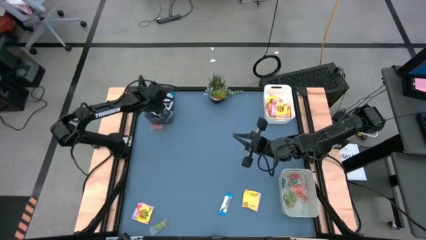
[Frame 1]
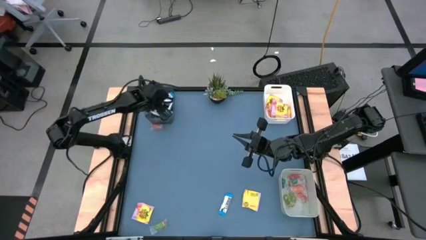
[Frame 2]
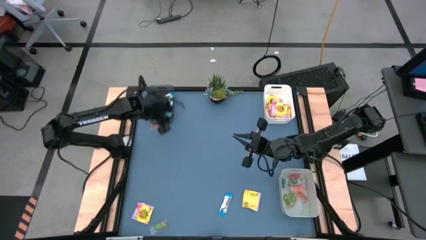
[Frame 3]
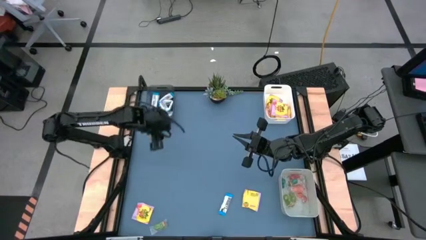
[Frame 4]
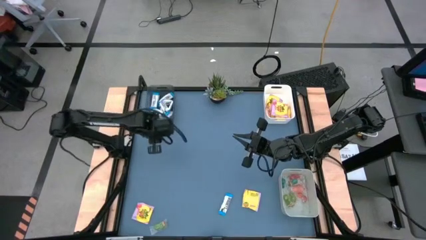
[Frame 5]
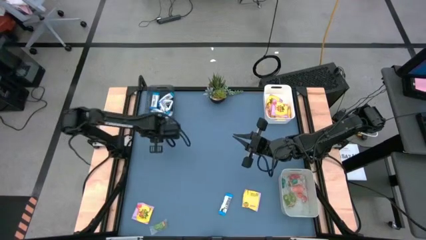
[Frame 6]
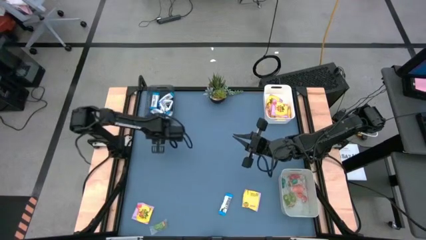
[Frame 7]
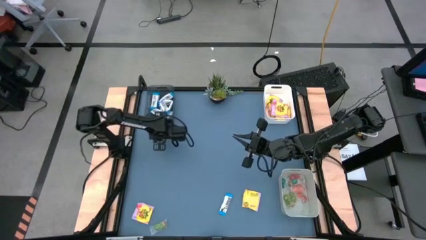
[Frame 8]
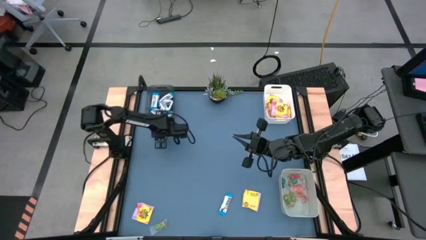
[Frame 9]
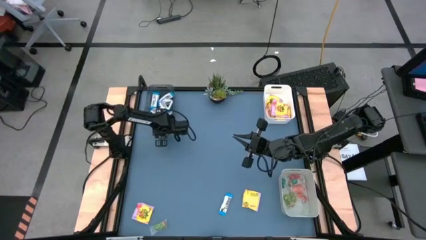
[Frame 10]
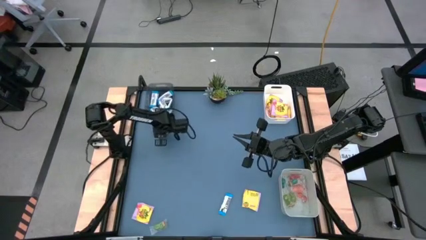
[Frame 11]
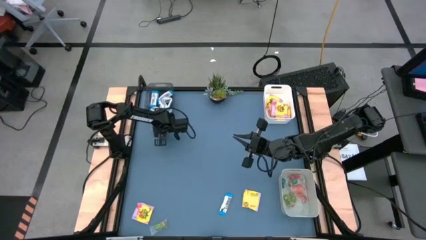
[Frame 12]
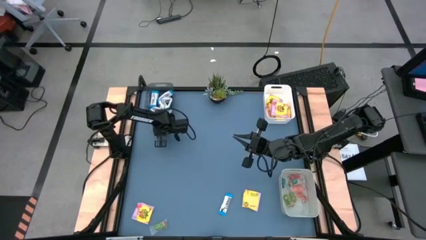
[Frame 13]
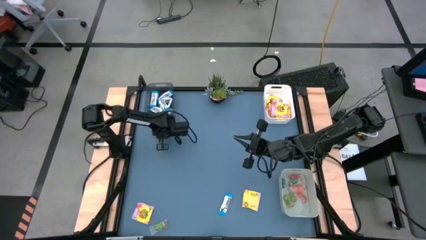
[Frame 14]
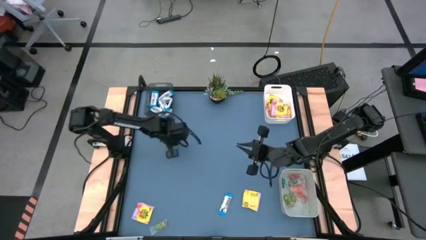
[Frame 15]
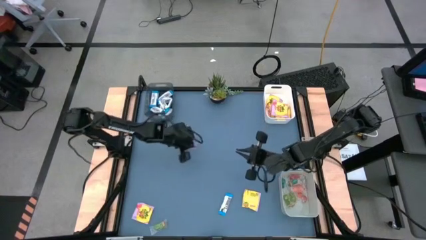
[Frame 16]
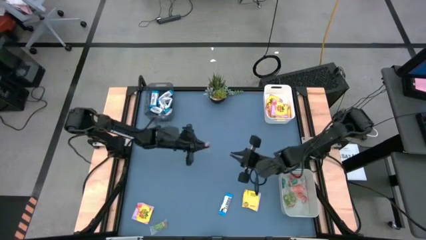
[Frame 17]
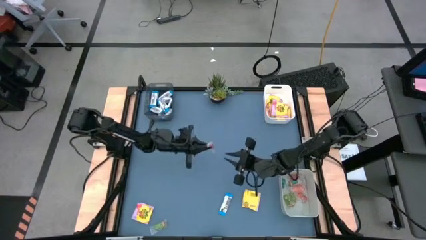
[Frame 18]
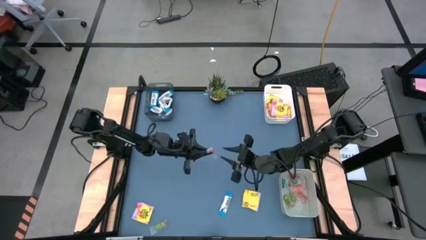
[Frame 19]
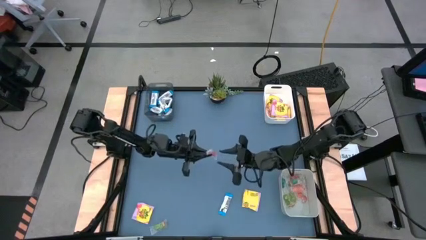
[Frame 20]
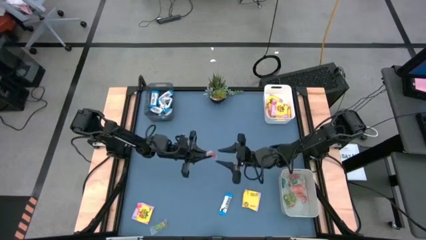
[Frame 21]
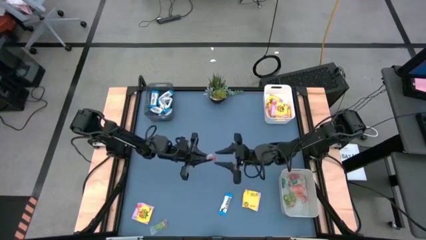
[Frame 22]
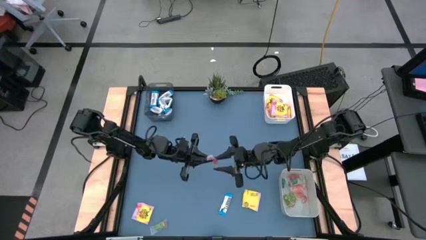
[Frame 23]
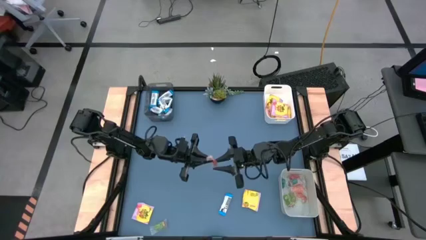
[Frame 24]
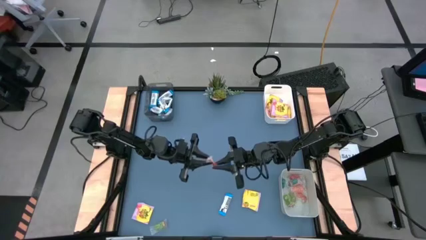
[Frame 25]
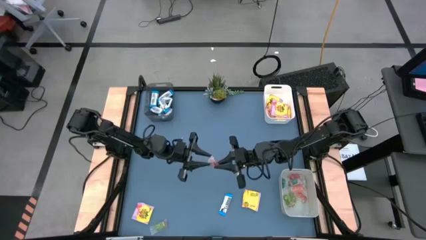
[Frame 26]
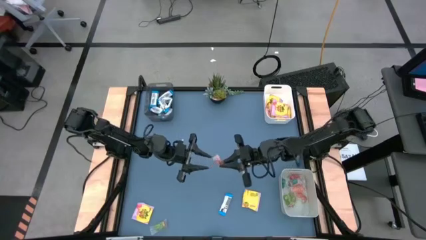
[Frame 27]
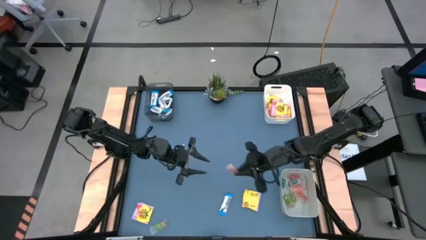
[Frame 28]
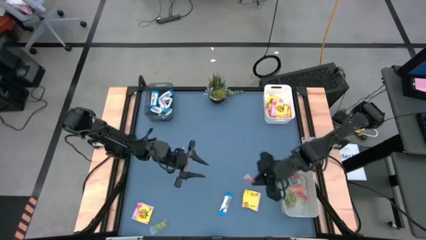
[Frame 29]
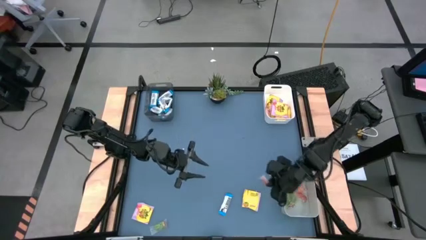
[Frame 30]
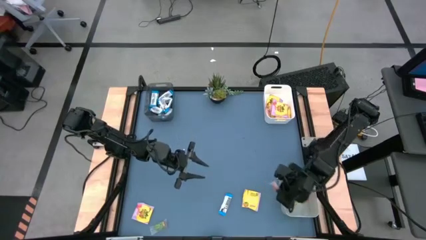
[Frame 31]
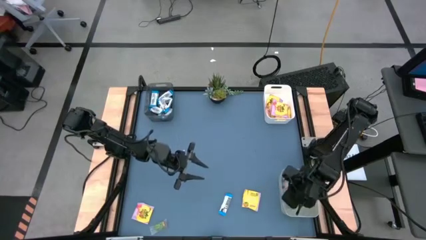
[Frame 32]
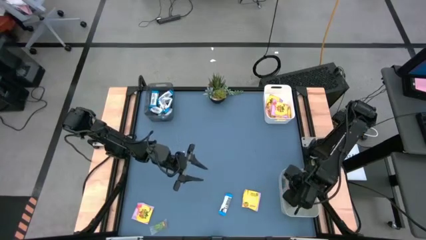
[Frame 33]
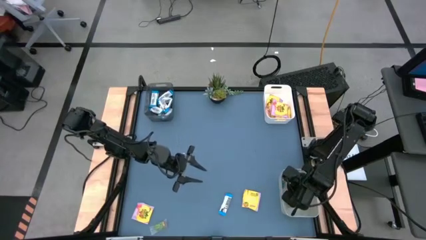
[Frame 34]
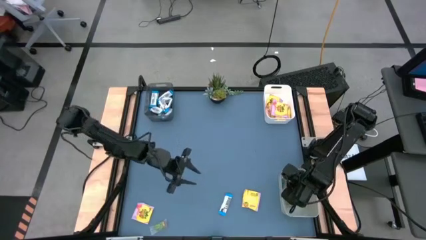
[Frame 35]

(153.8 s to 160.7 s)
Task: Sort candy
Put the orange gummy candy into the grey bin

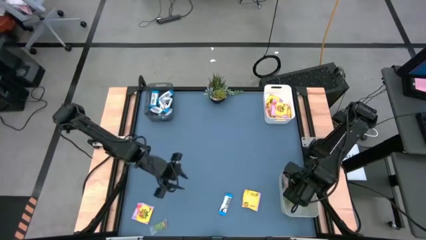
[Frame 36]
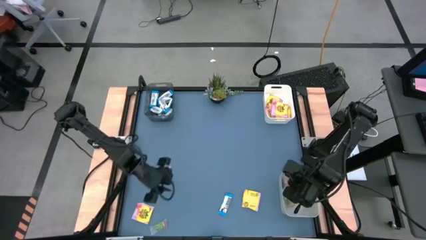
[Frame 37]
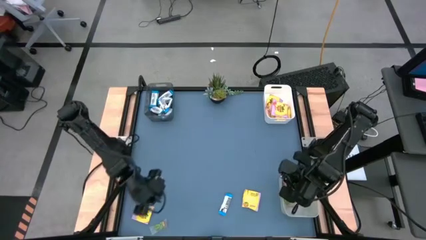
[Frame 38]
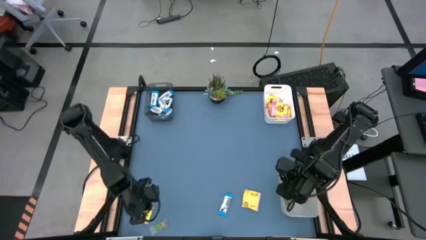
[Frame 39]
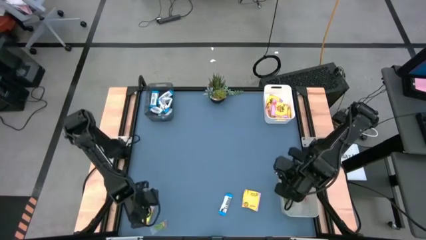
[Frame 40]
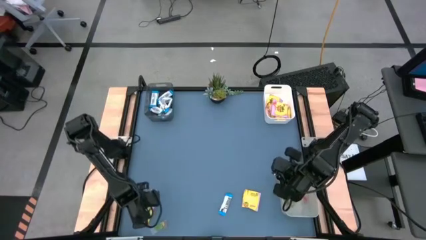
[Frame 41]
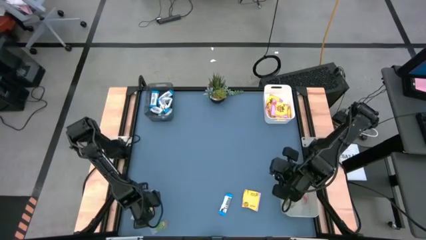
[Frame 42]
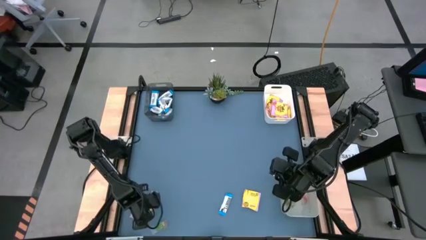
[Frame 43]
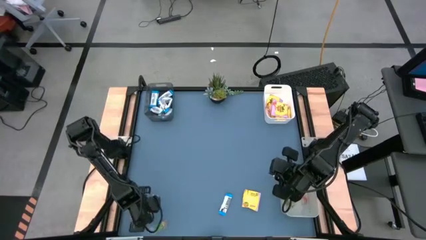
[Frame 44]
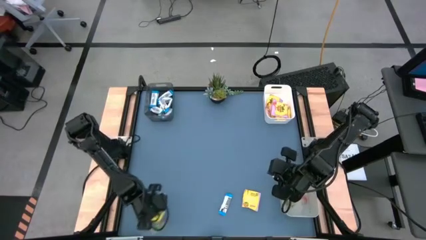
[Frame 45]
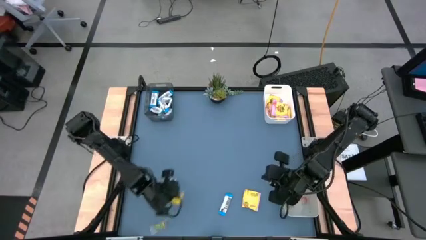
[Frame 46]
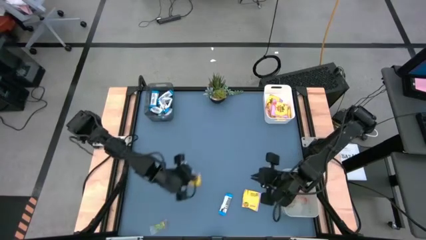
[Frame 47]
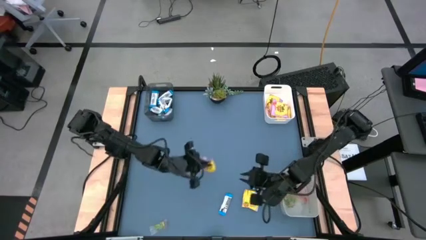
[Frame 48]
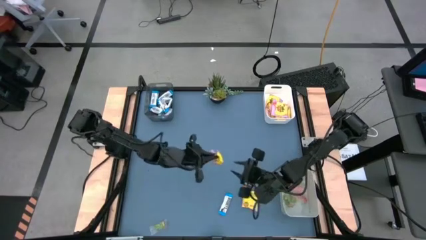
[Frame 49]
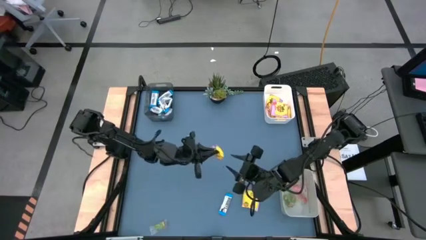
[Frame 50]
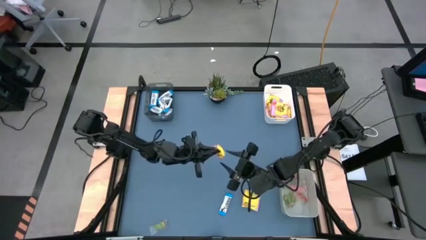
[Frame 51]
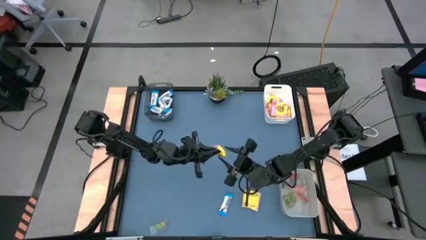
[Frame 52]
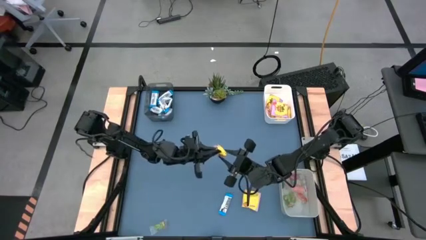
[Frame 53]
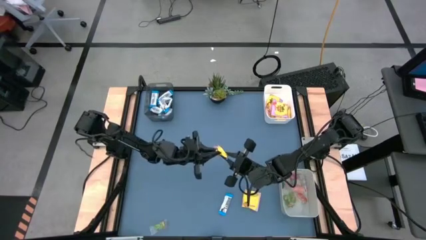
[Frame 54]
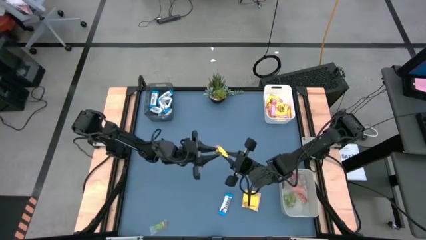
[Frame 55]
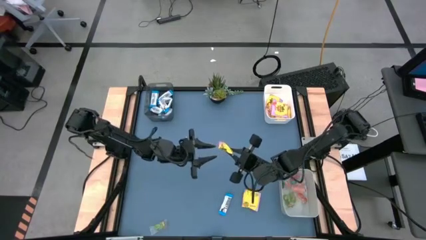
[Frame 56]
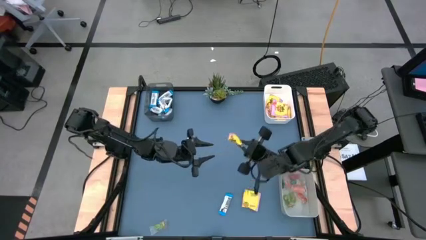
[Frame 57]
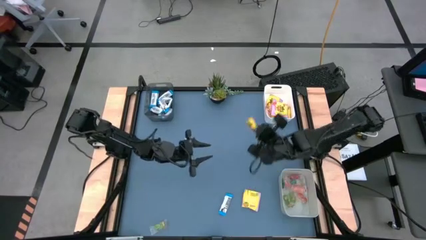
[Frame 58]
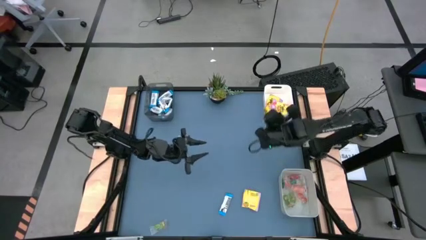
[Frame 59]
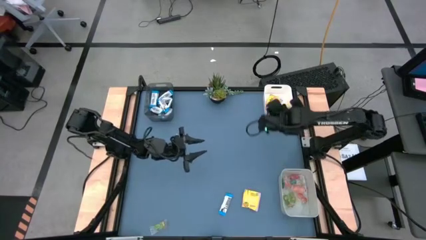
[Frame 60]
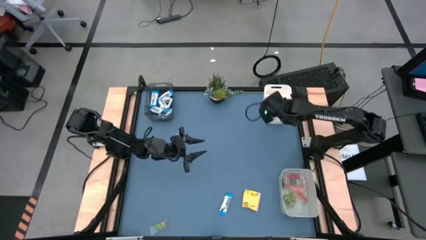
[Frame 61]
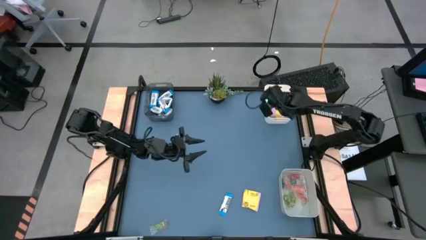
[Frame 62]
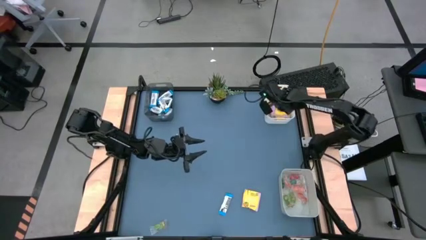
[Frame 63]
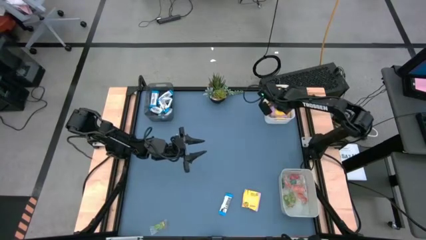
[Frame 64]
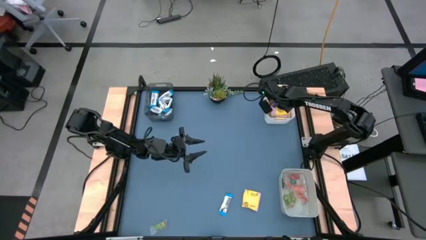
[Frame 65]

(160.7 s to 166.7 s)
Put the bottom left yellow candy pack into the white bin

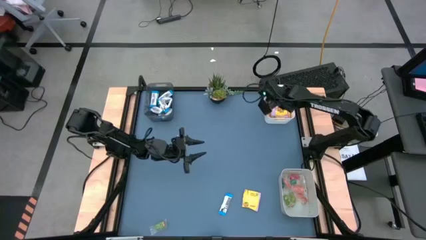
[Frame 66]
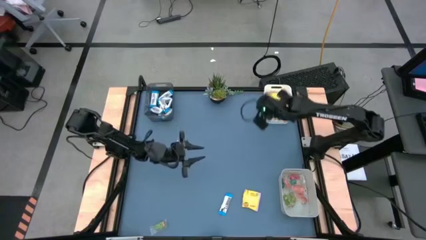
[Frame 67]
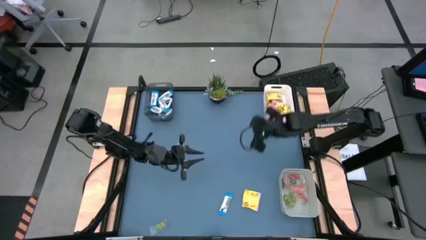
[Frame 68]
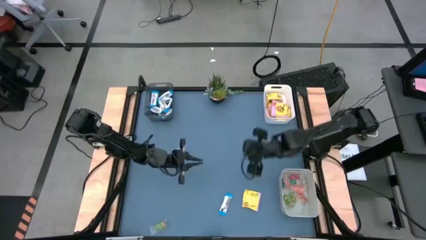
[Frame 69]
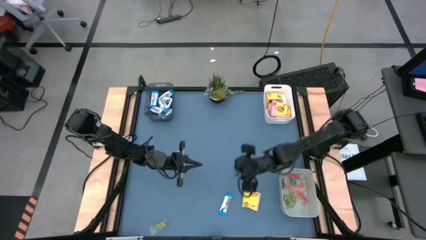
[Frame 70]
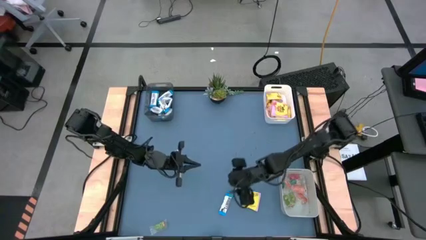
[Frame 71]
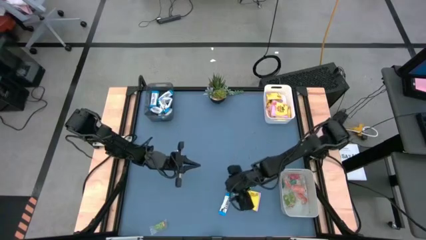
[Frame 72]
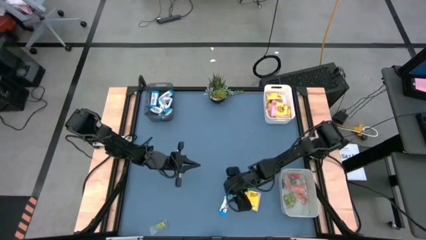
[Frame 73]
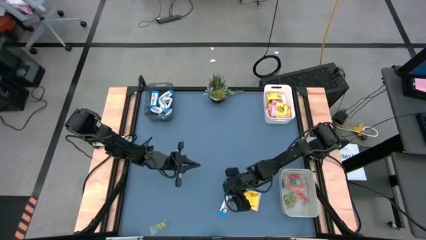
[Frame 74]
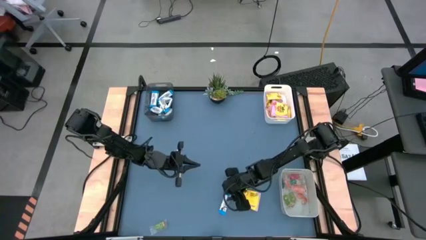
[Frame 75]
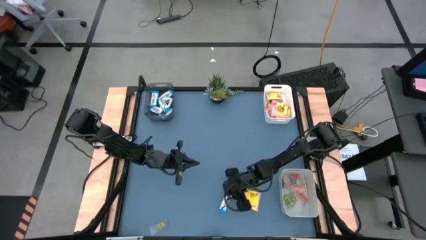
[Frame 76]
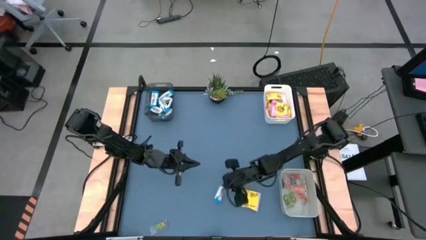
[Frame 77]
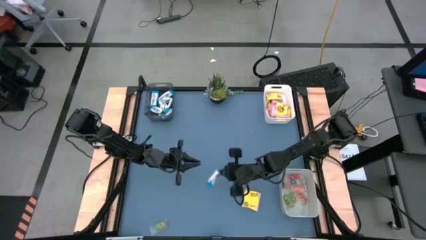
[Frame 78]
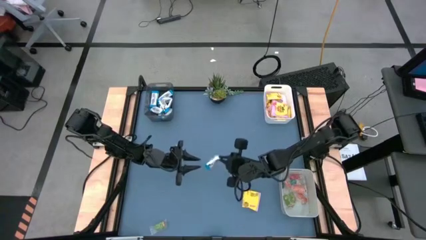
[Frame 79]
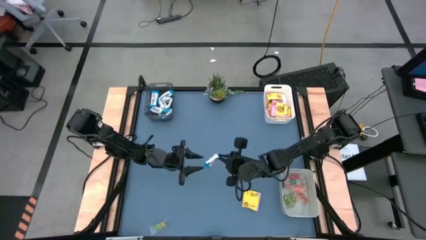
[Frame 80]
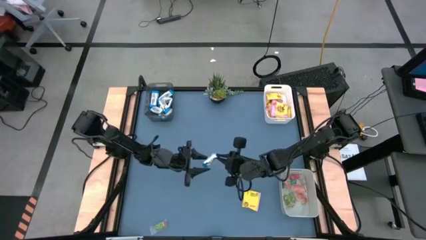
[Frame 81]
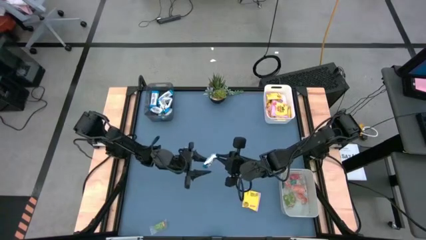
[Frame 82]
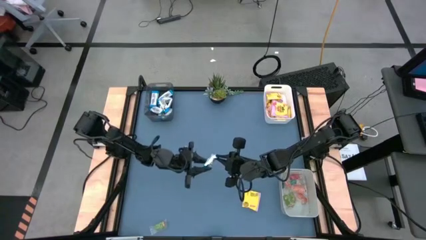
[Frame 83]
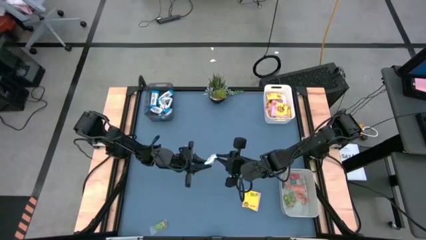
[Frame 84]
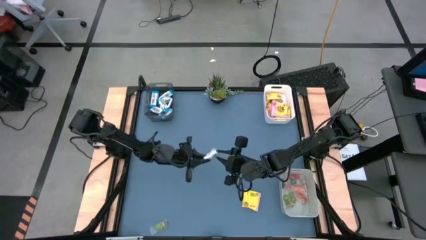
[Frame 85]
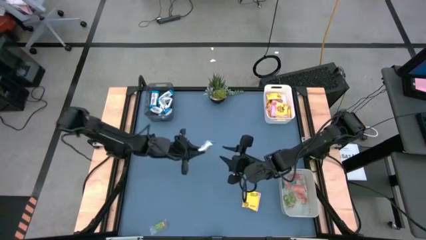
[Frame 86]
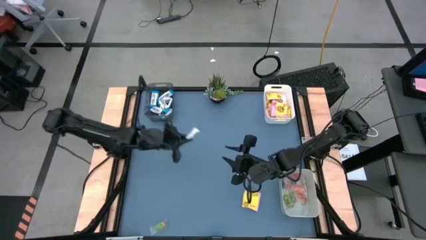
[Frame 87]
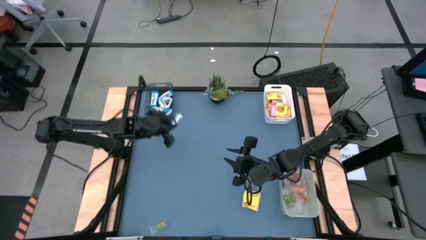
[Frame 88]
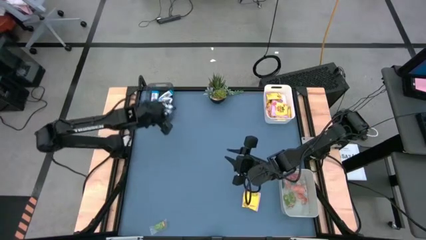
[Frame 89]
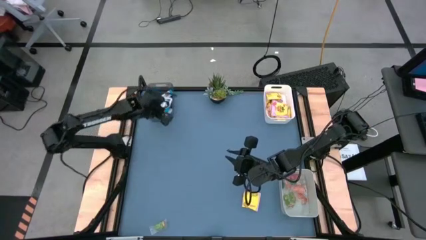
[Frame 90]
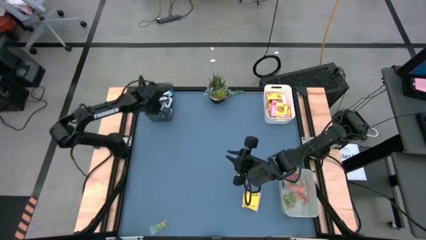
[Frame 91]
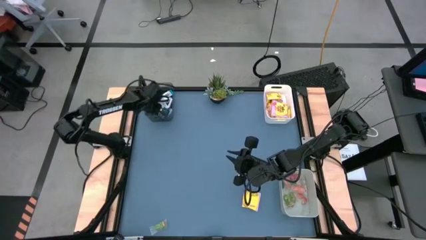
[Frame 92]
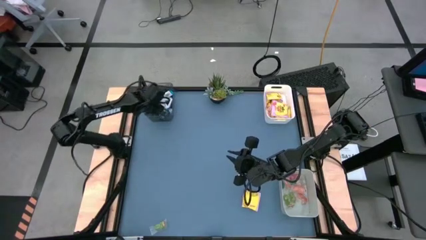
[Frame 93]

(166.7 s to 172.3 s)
Put the white chocolate bar into the transparent black bin
